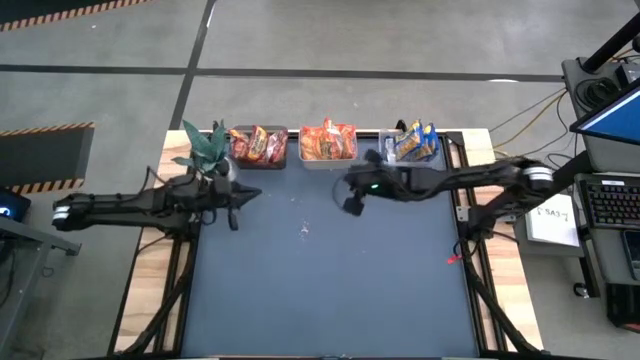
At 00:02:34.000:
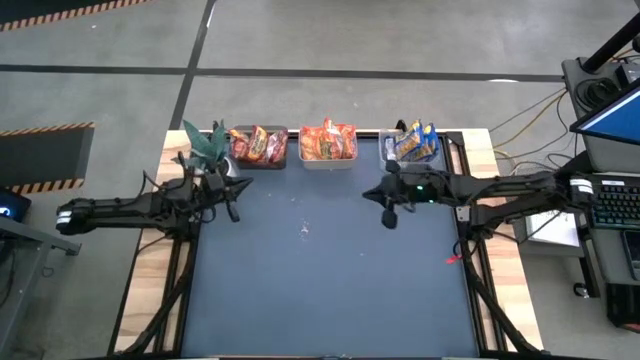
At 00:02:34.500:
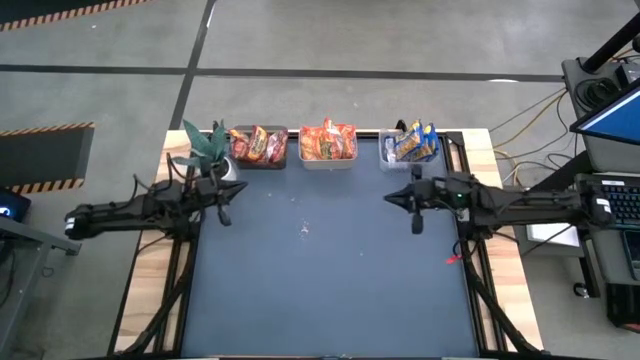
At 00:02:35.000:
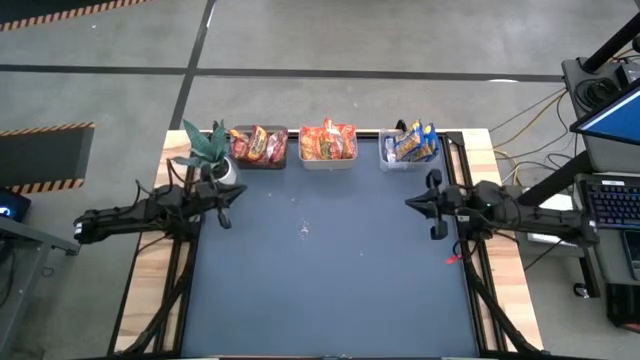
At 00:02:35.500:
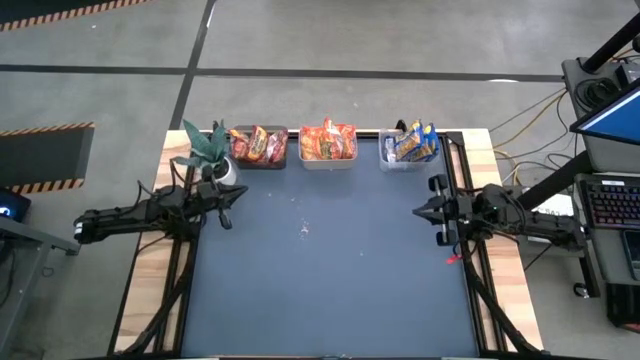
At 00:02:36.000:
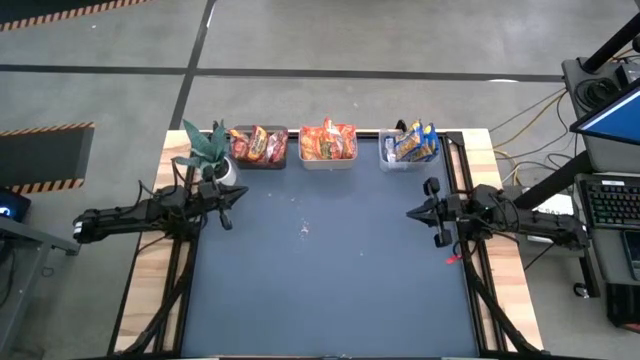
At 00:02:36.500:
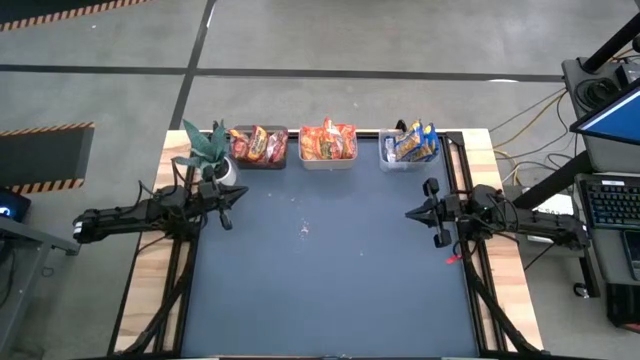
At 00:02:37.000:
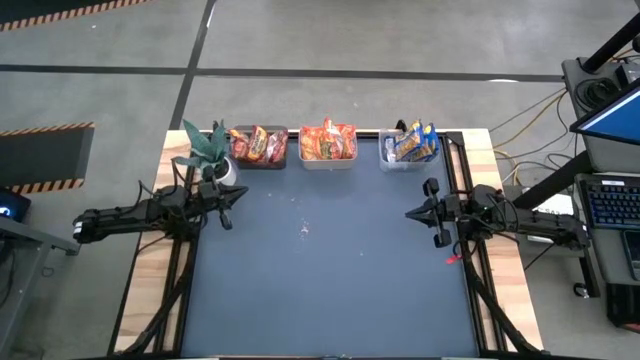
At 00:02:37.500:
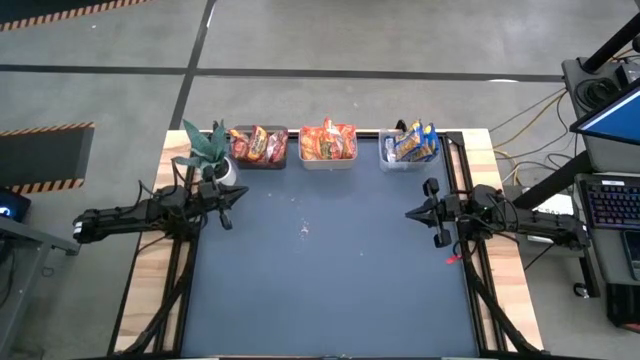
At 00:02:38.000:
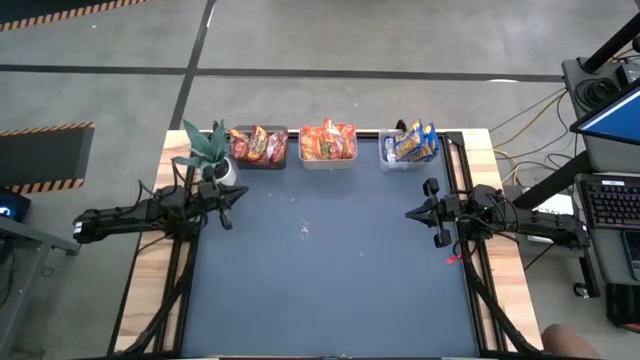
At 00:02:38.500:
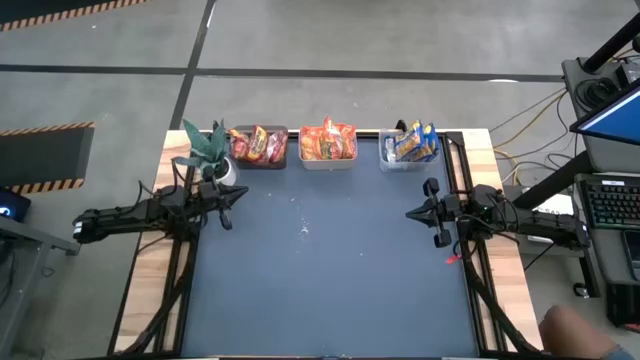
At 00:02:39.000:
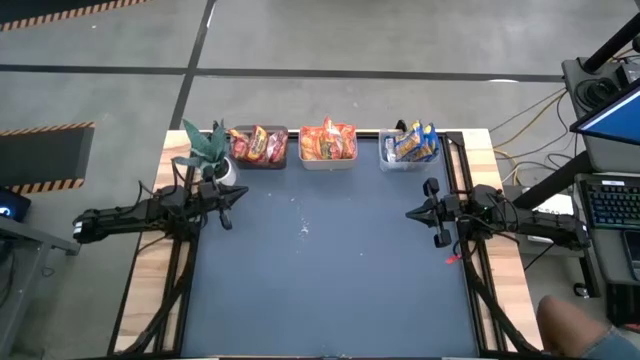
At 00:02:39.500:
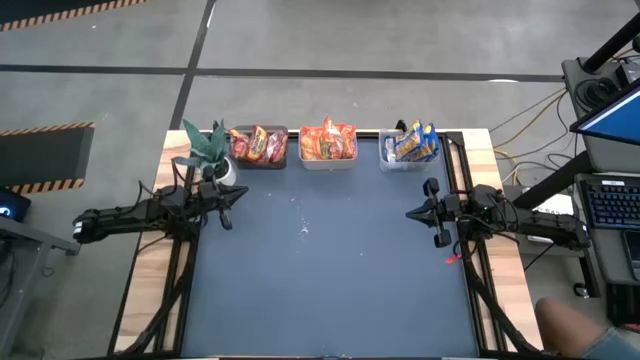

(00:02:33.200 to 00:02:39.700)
Task: Sort Maruchan noodles
Return to Home Position

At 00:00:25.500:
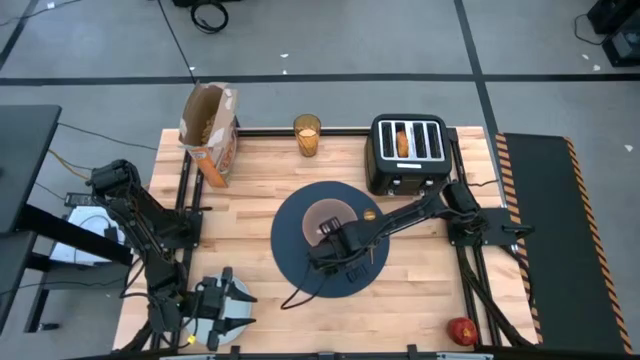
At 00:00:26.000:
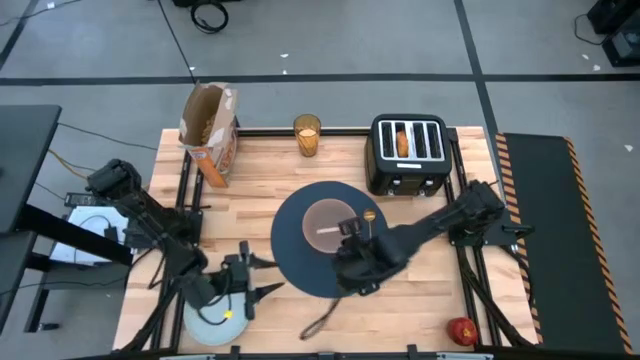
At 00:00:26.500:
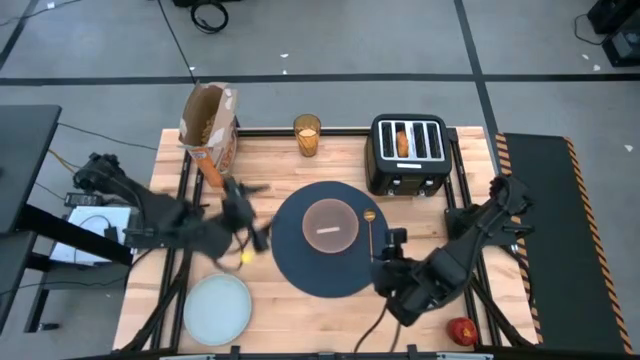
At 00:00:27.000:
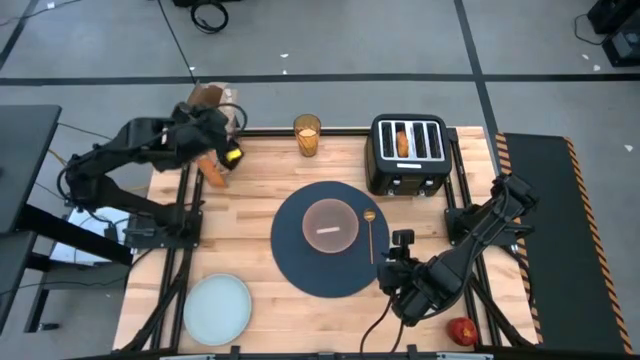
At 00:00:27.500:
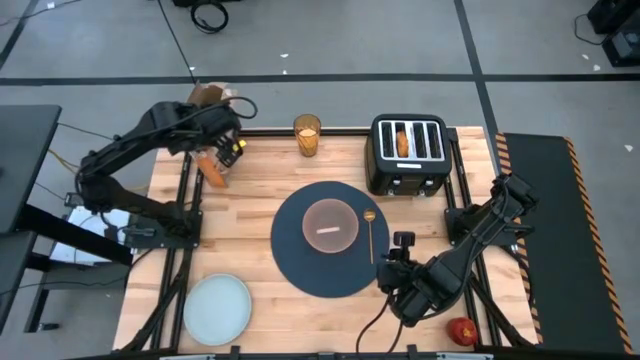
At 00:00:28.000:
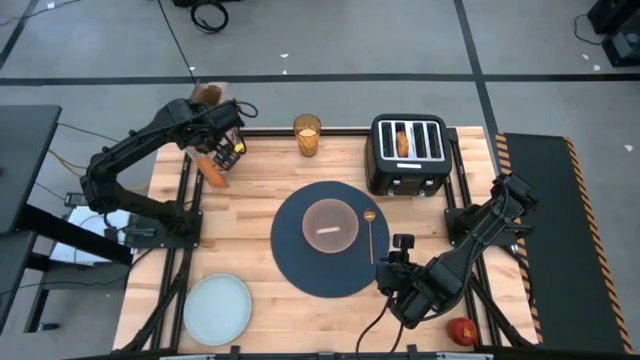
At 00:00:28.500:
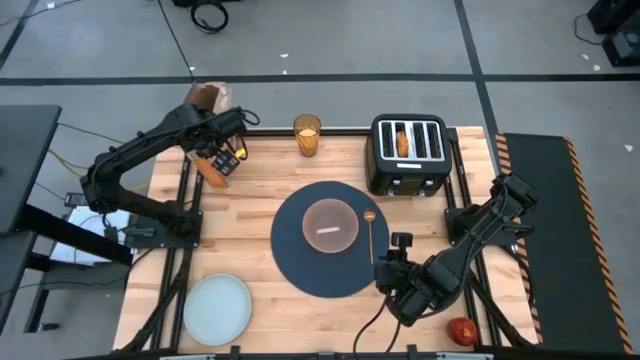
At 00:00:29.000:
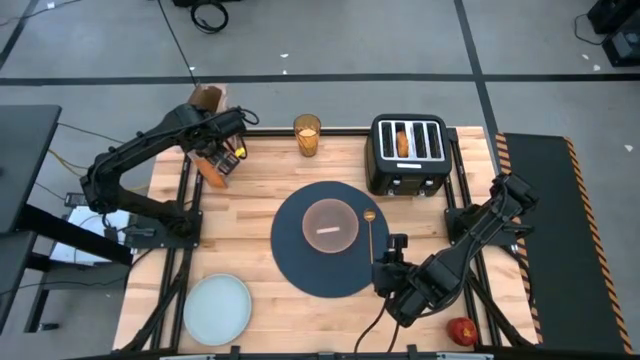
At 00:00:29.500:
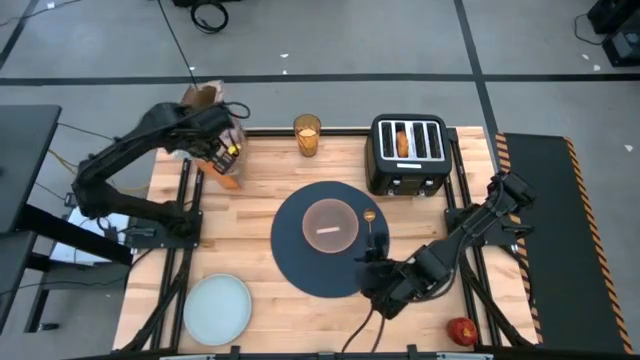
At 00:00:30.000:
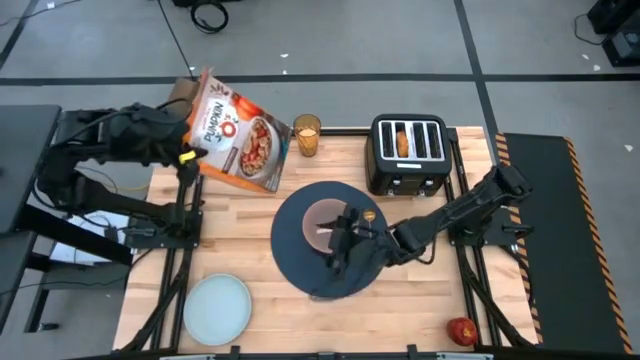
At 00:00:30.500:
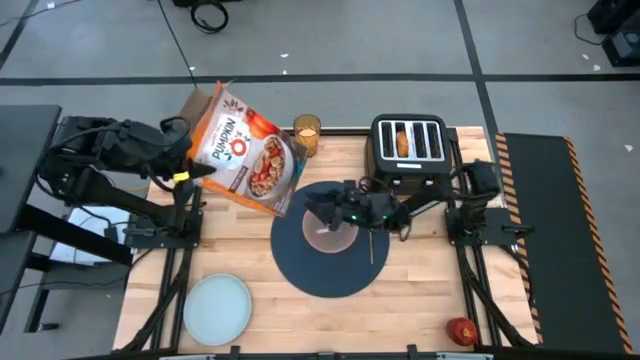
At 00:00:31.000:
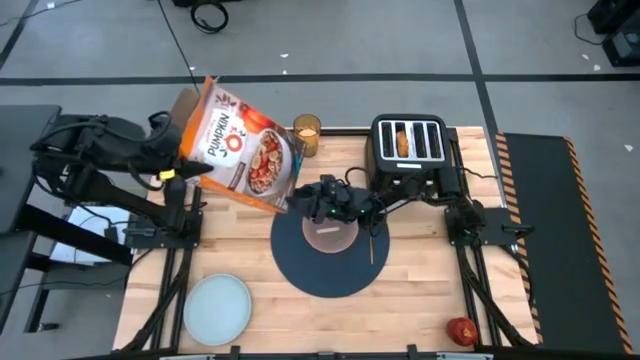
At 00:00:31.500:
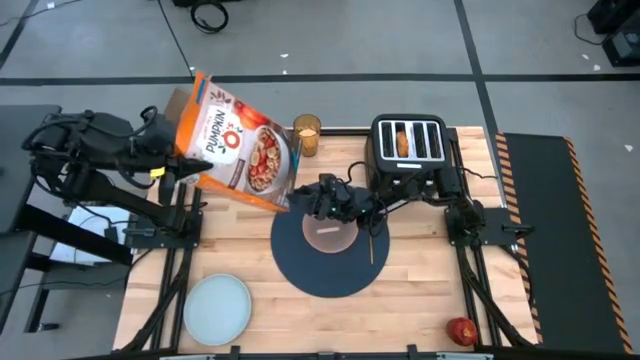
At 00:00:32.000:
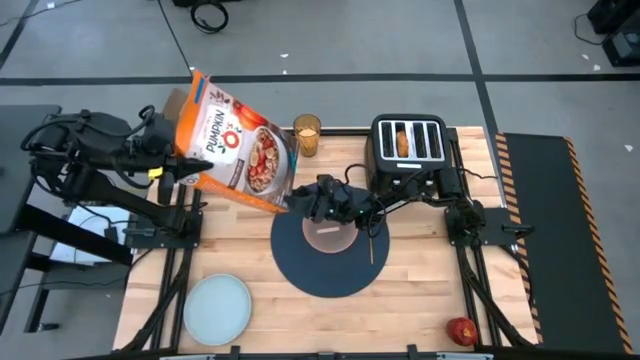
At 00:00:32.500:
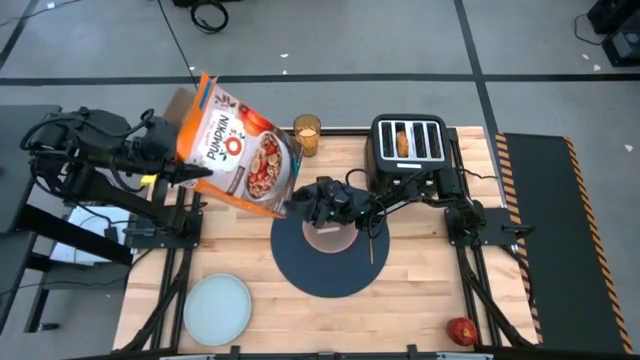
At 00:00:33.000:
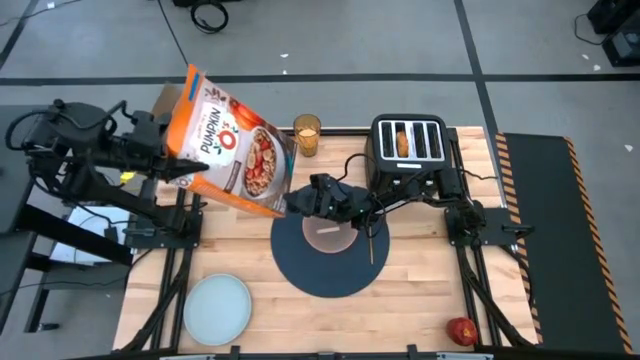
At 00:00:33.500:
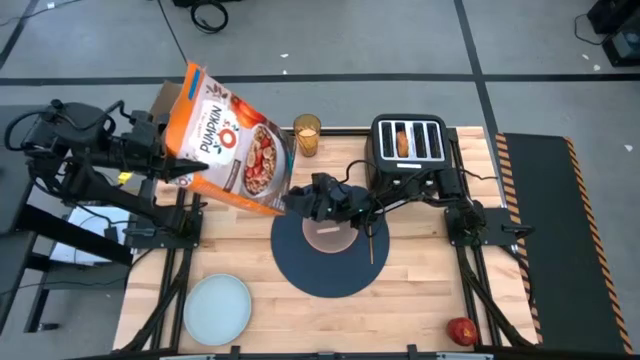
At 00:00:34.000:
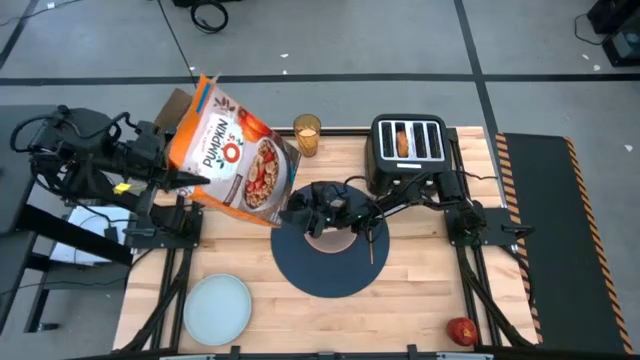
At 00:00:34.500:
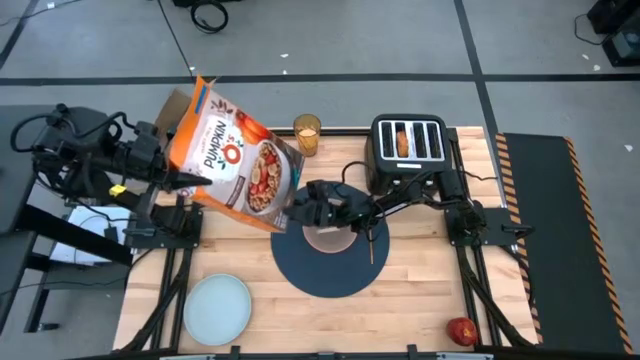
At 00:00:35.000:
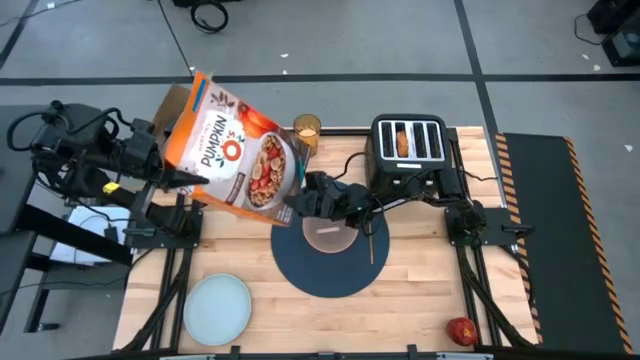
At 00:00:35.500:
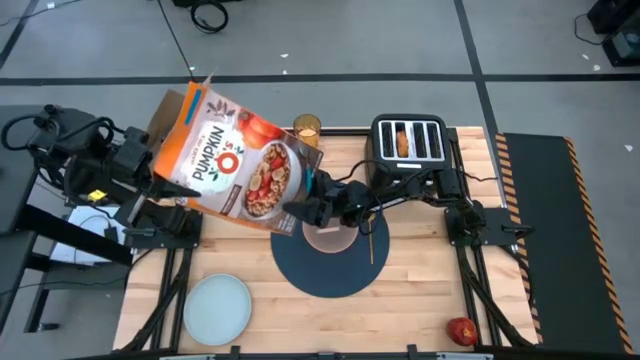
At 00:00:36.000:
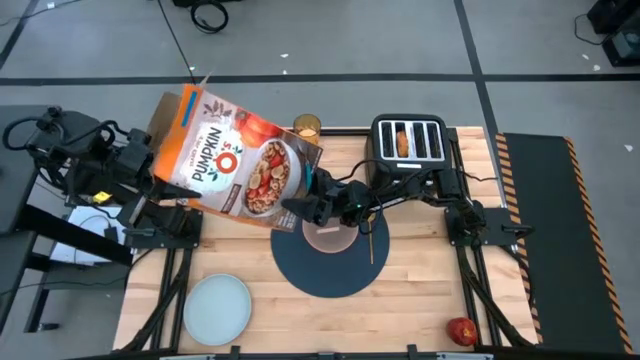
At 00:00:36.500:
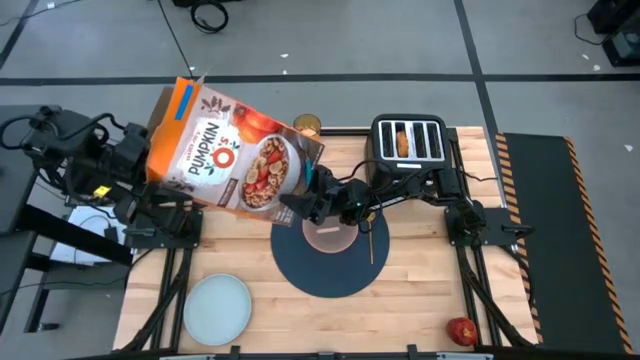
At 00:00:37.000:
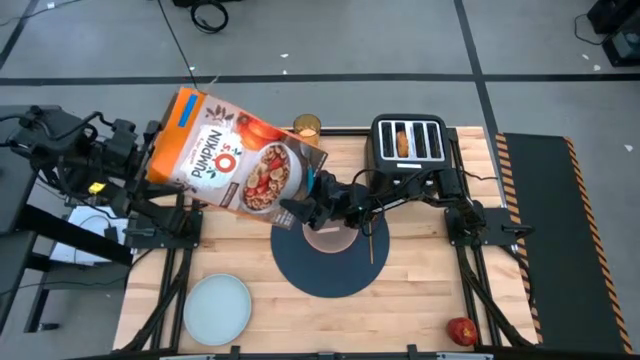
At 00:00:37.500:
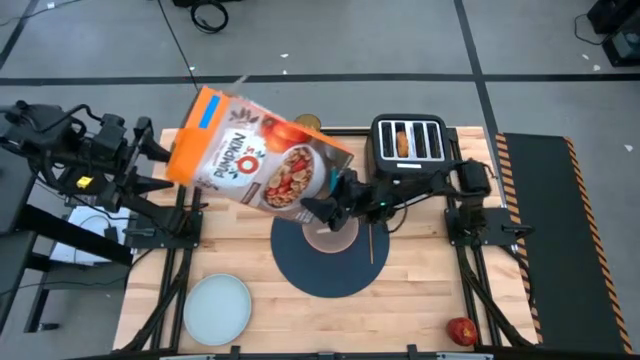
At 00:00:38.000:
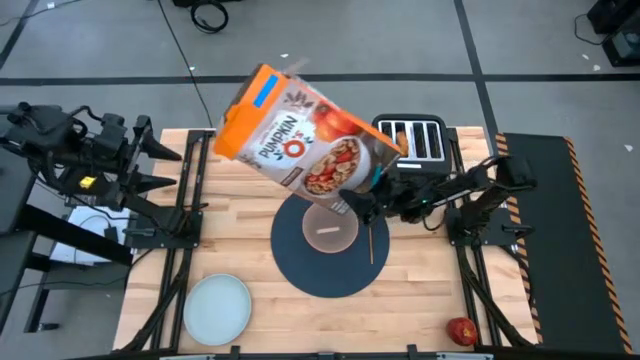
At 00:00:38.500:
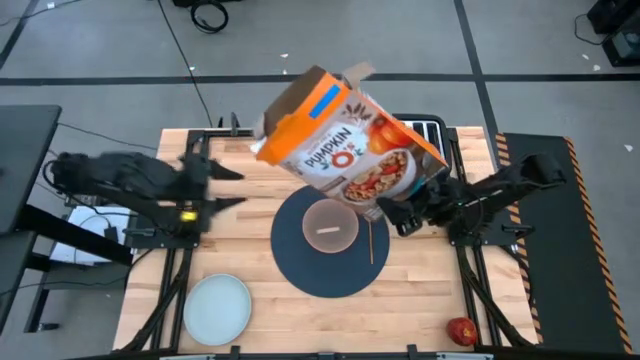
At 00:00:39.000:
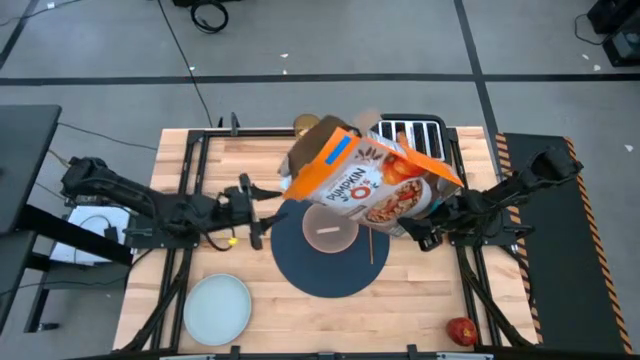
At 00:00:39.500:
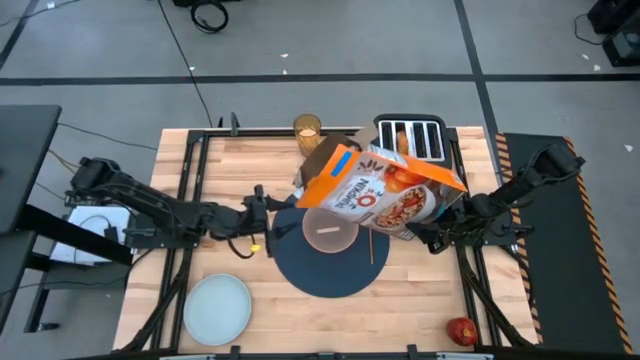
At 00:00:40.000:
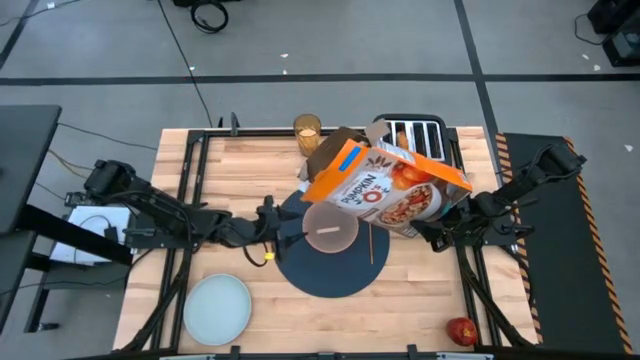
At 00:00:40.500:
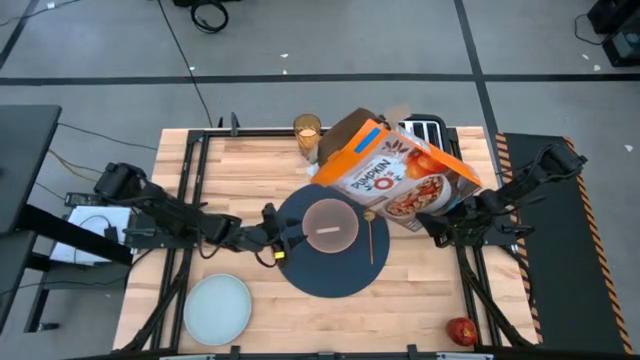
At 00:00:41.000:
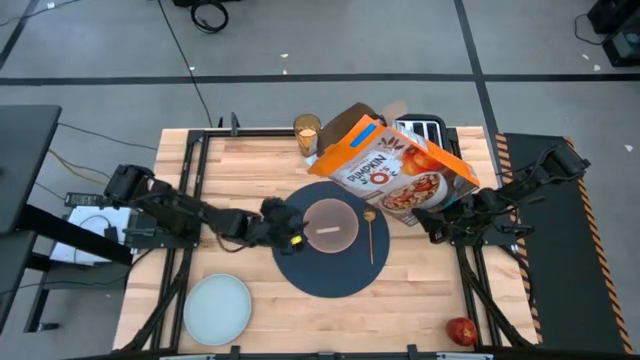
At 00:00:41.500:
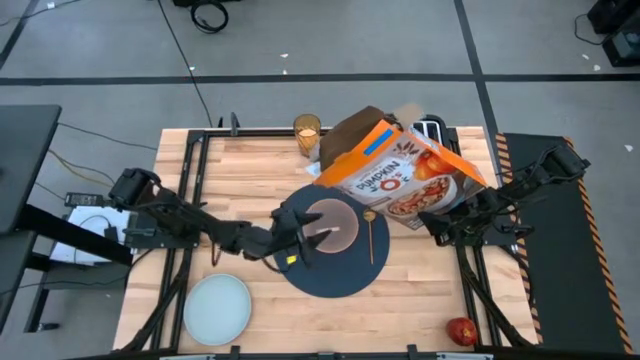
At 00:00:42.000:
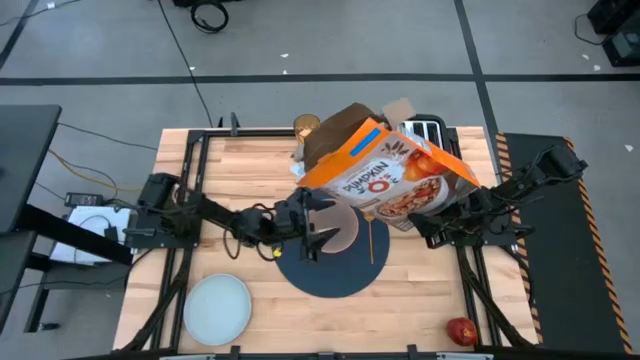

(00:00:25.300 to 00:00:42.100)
Task: Arrange a breakfast setting
Pour the cereal from the cereal box into the bowl
